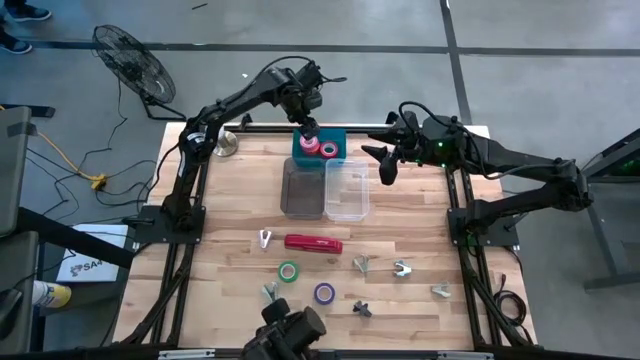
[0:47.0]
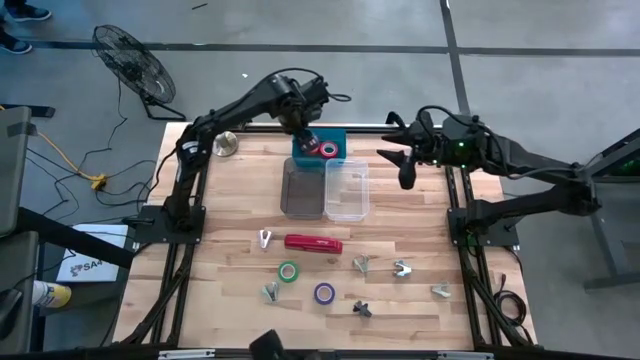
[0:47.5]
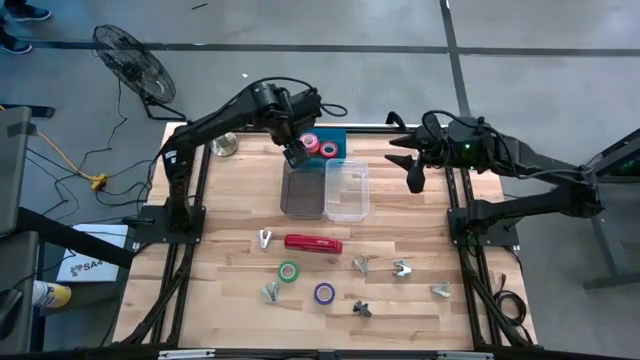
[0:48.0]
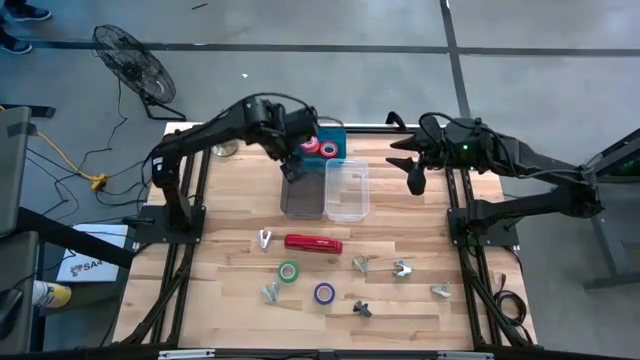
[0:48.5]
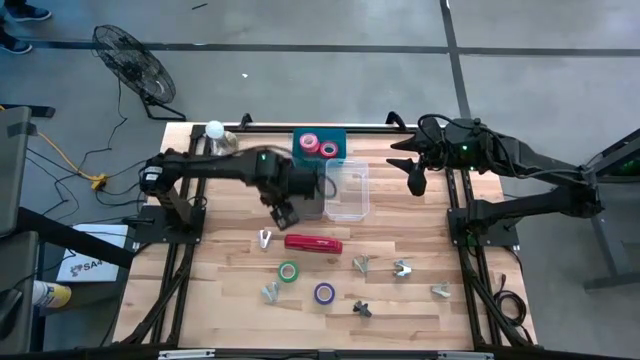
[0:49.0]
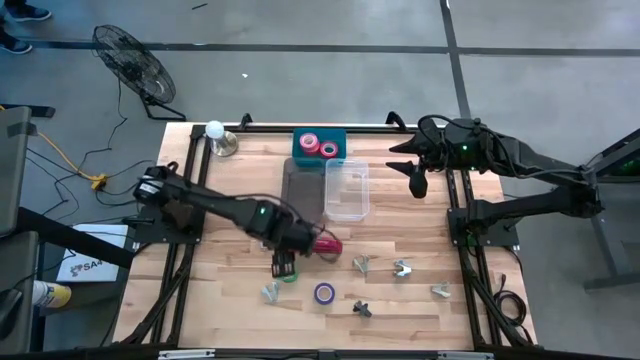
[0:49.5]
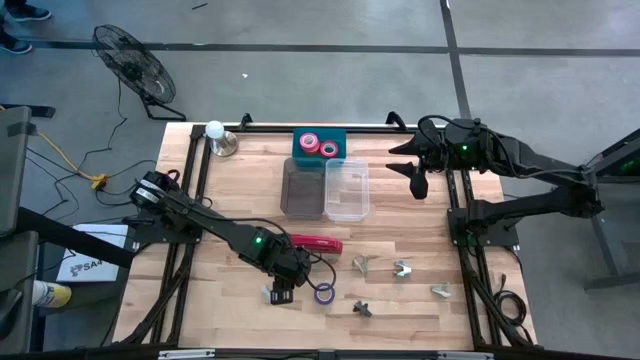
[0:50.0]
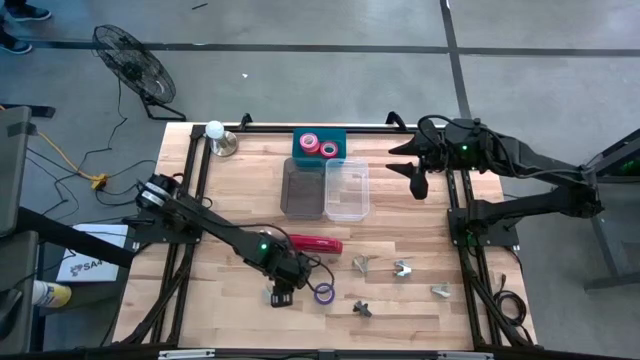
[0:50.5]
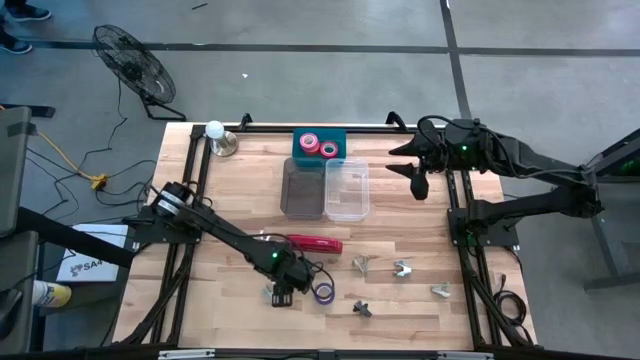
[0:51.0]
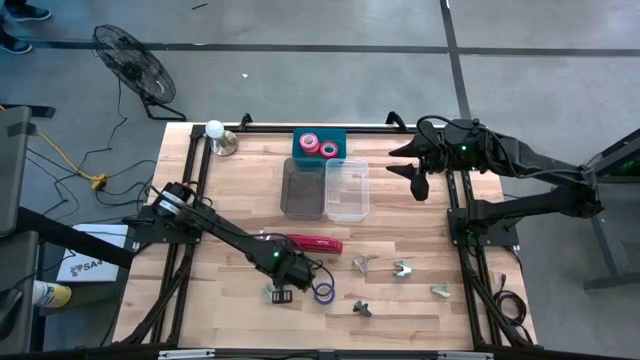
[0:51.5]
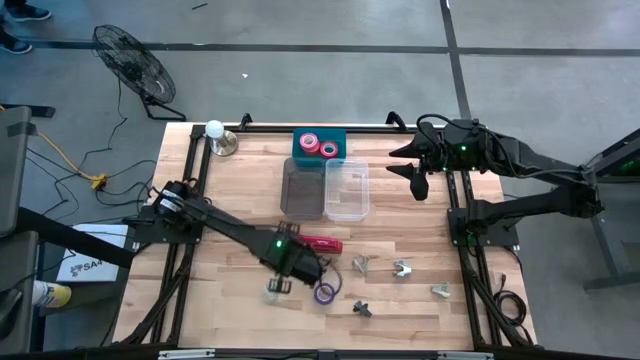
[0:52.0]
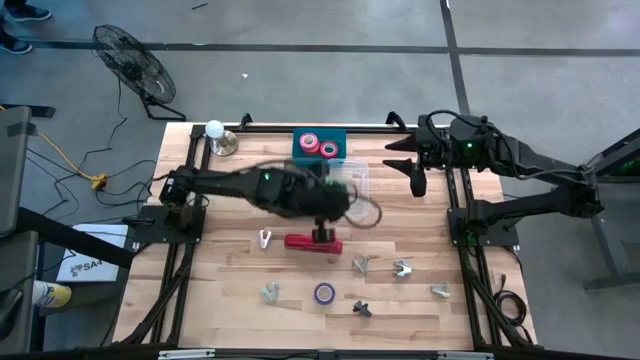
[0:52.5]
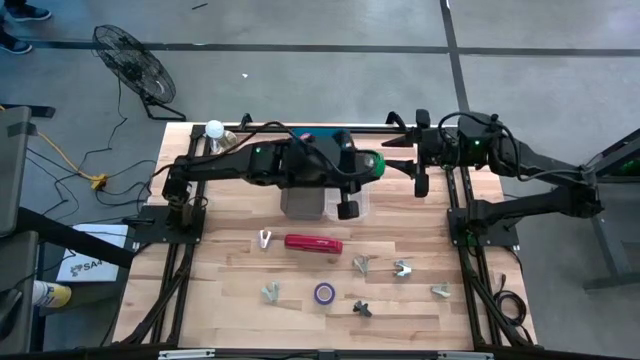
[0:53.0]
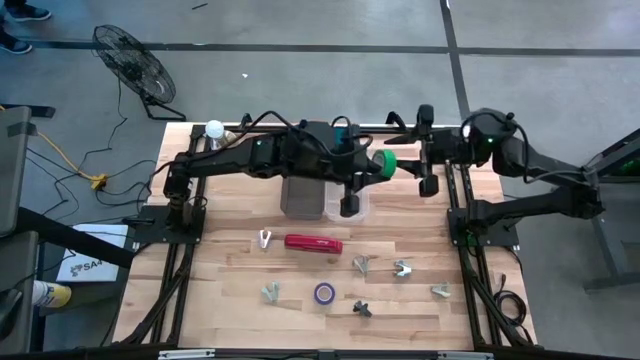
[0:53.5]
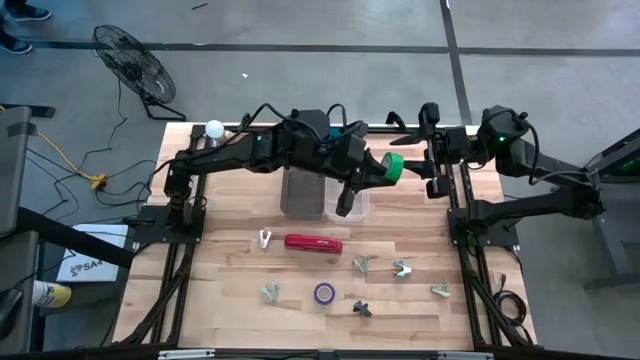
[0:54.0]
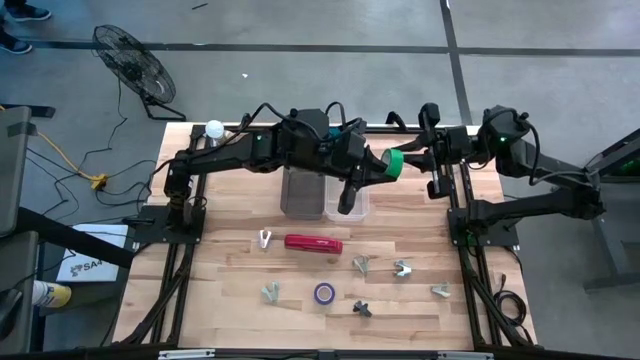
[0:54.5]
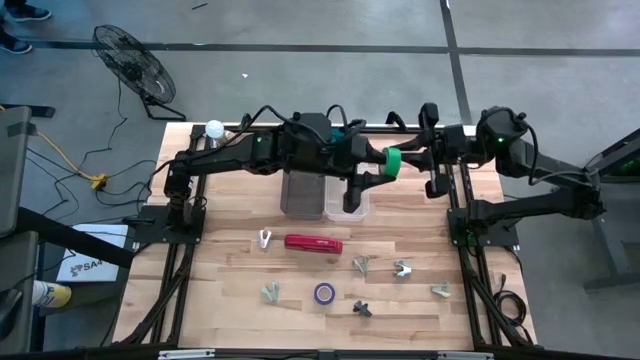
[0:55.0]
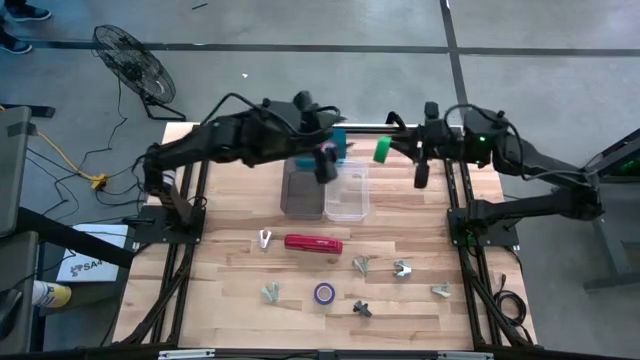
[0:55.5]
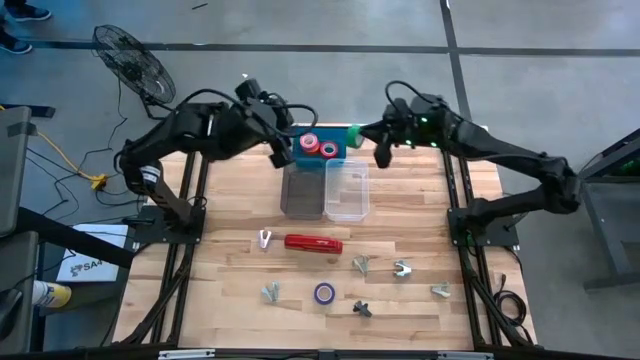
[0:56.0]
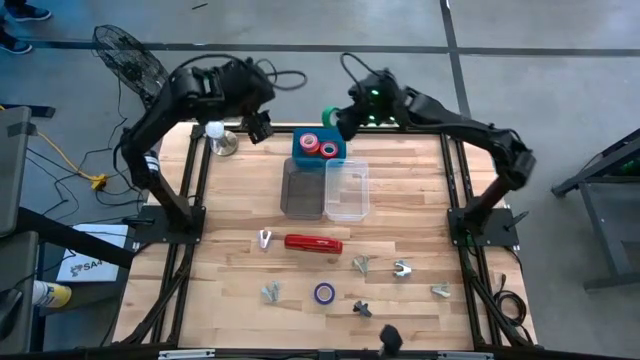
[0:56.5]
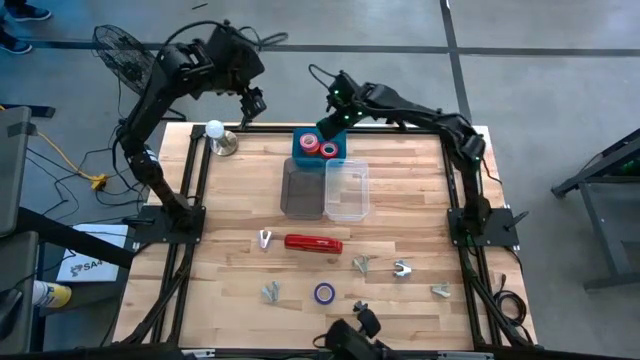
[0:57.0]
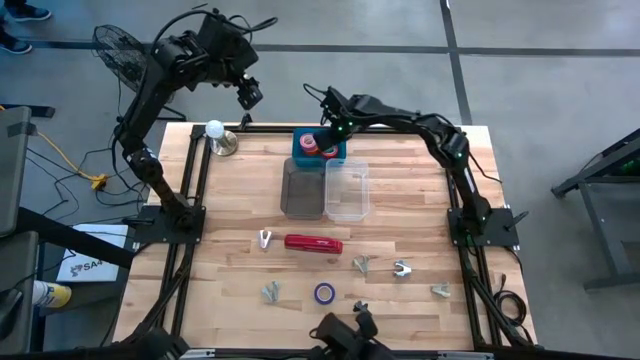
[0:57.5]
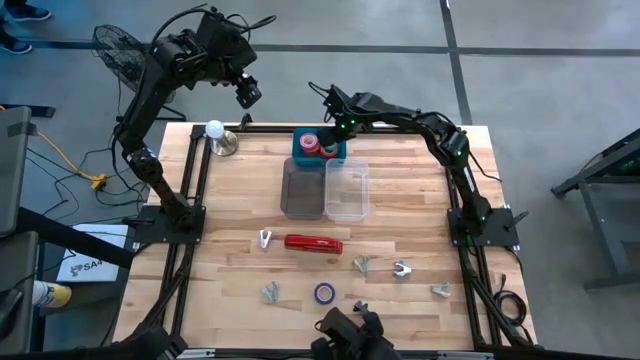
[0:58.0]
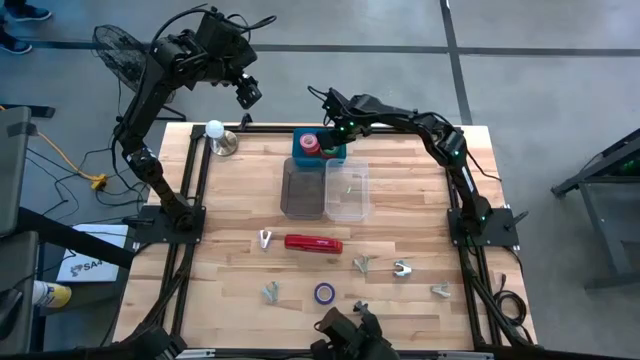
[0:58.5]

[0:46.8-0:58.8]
Task: Pick and place Stapler, Stapler remover, tape
Put the green tape into the blue bin

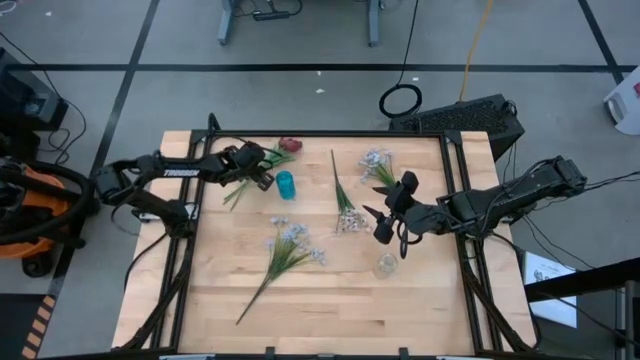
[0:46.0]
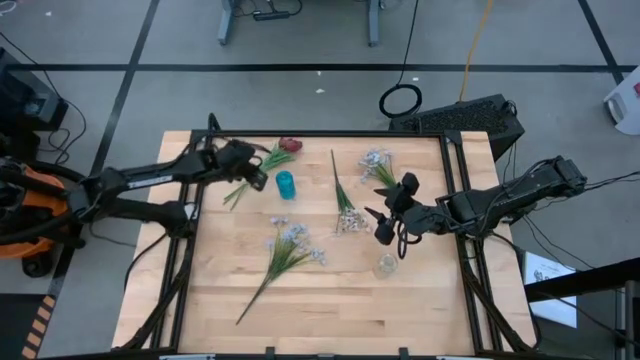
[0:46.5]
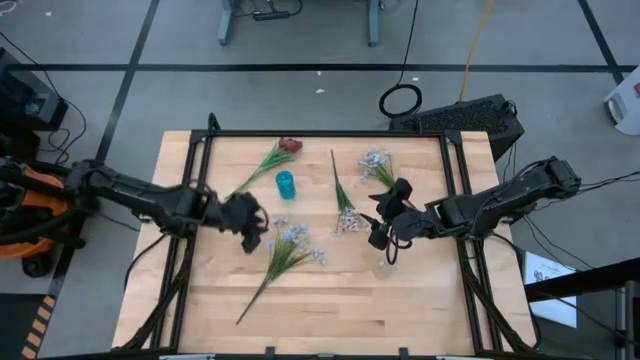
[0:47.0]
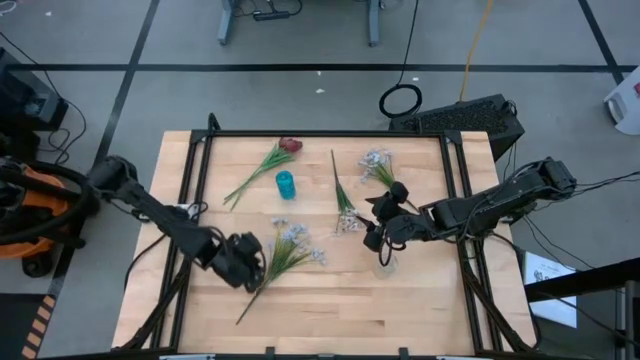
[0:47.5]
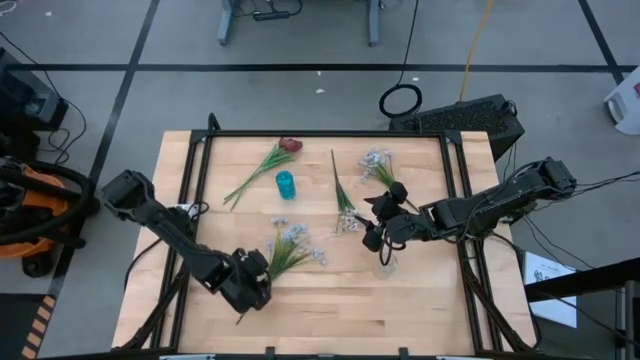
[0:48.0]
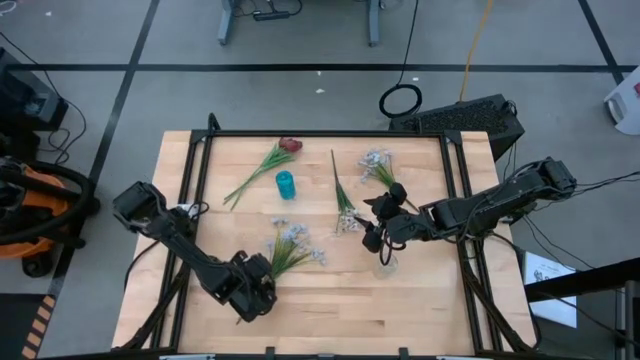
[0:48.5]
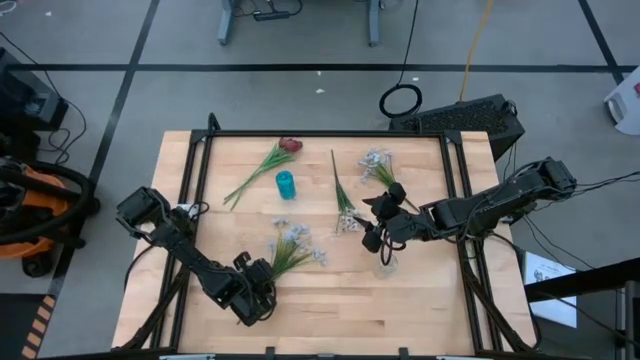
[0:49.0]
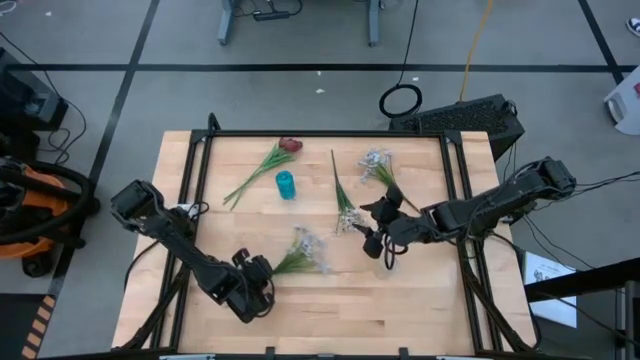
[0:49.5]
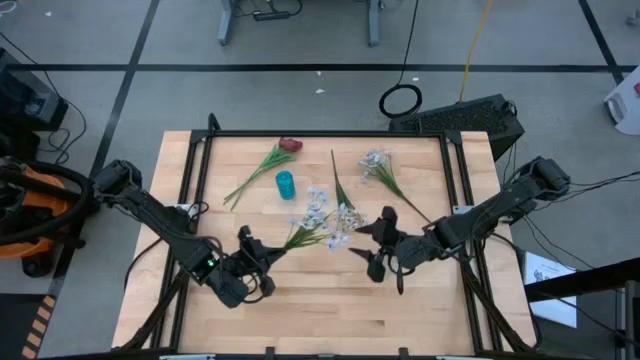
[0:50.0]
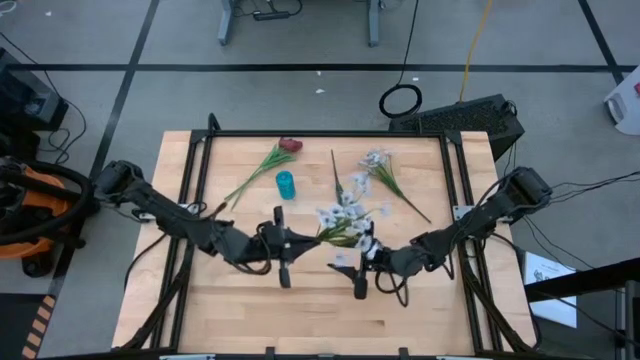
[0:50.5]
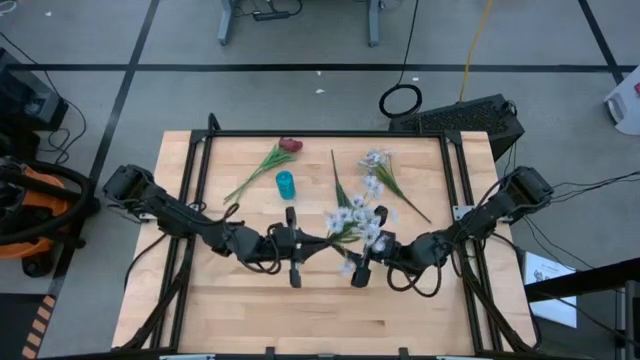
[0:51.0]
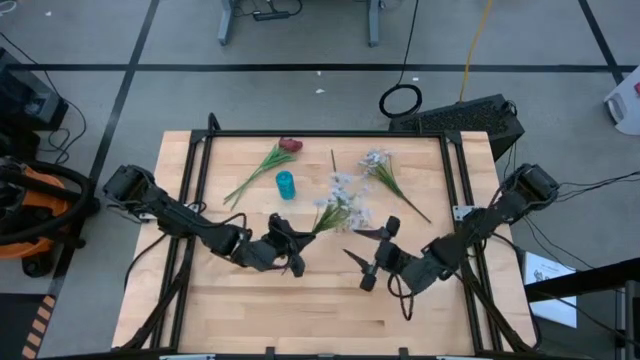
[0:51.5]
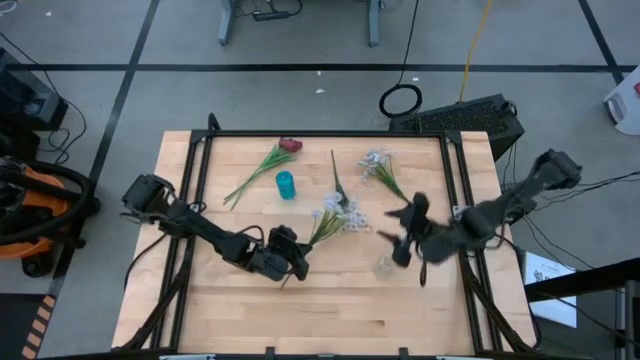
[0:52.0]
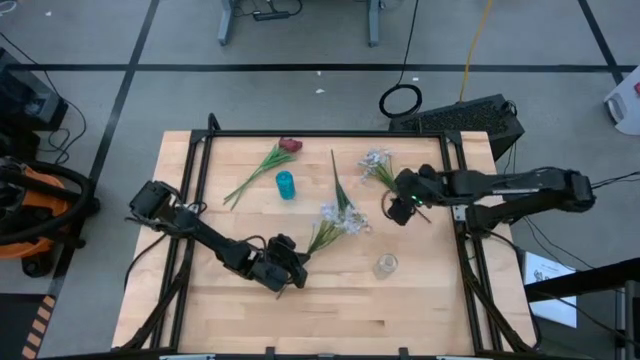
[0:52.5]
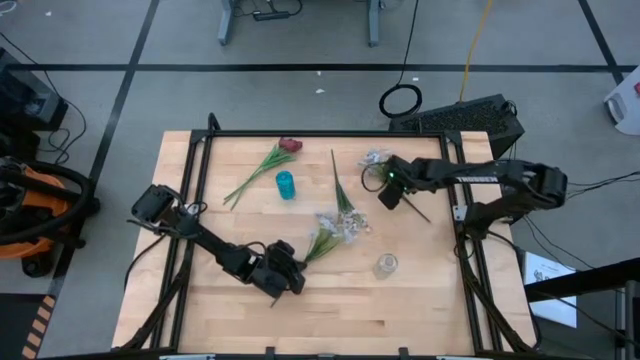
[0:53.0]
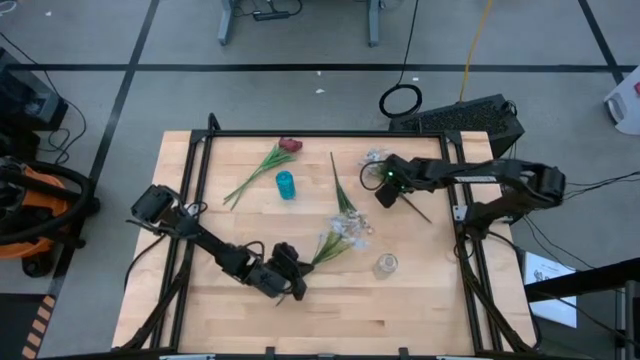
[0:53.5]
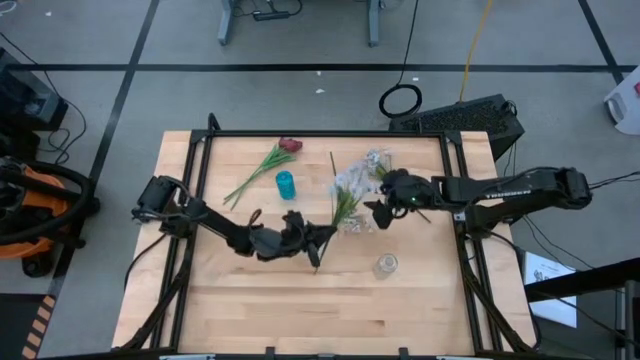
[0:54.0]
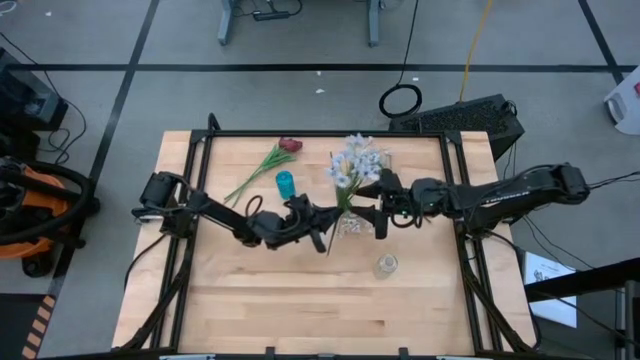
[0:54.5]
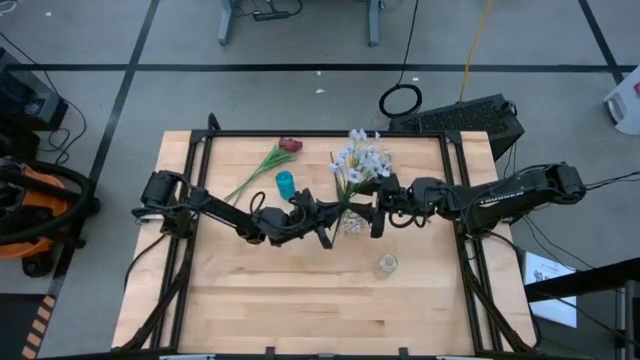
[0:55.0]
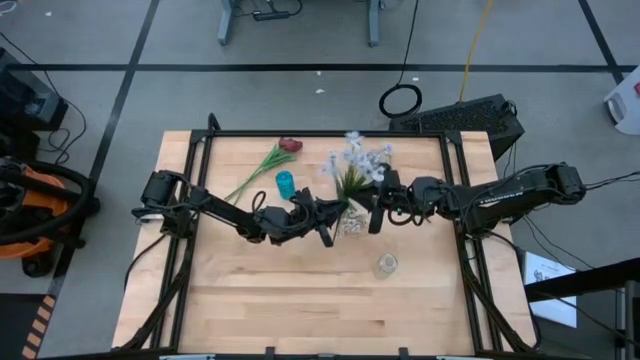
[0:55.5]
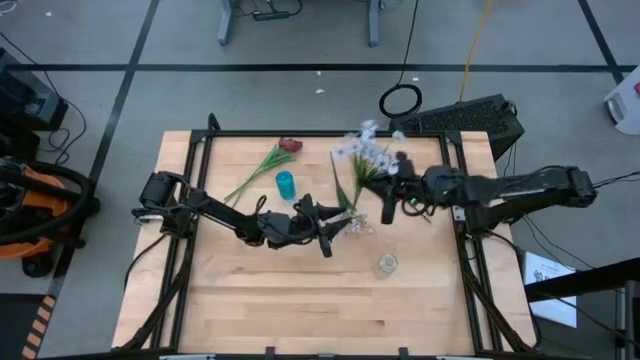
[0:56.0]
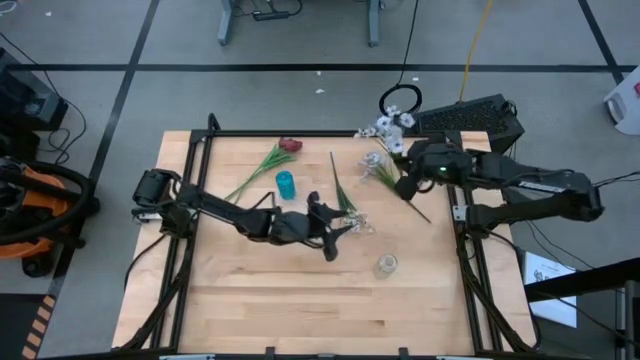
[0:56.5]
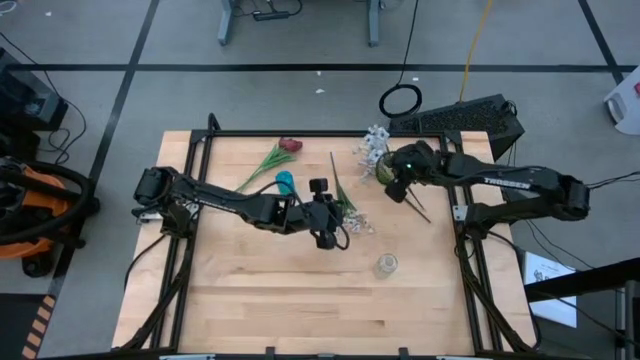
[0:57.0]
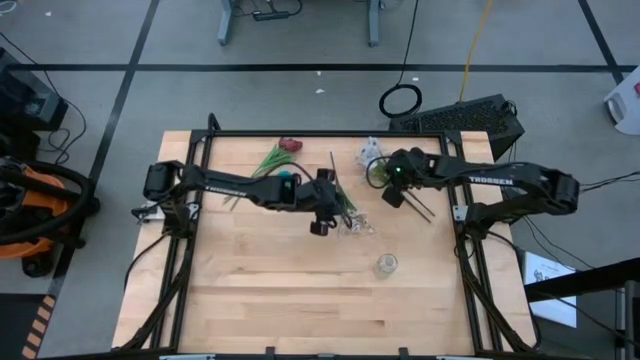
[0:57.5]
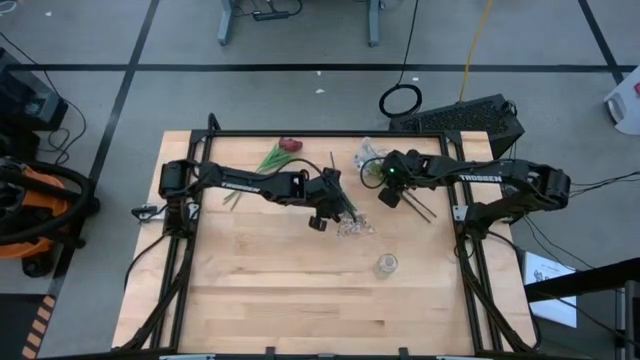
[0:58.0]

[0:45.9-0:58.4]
Task: Sort flowers into vase by color
Move the bottom white flowers to the top right of the table
